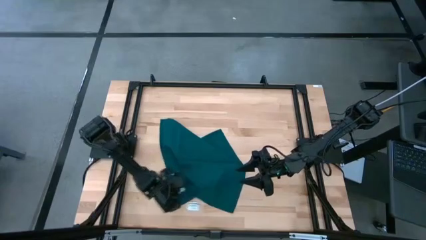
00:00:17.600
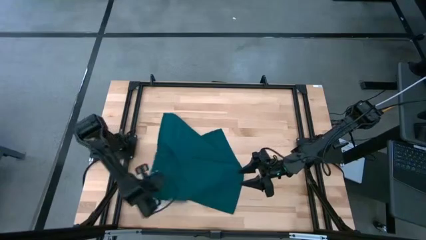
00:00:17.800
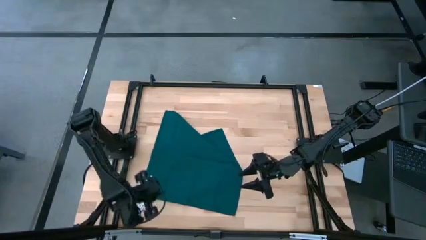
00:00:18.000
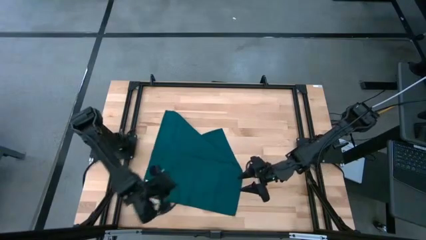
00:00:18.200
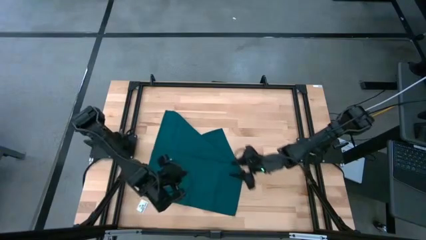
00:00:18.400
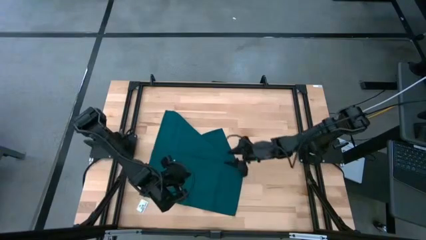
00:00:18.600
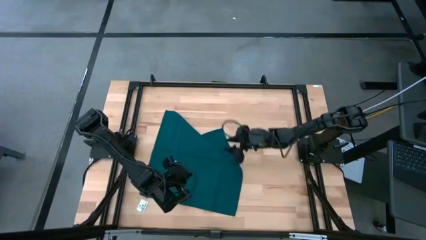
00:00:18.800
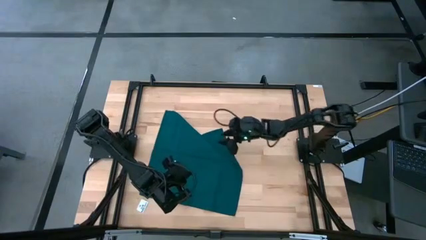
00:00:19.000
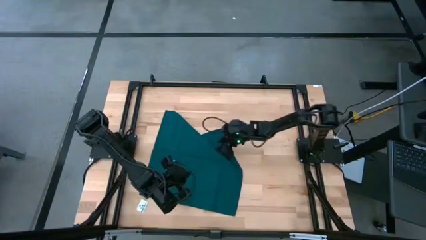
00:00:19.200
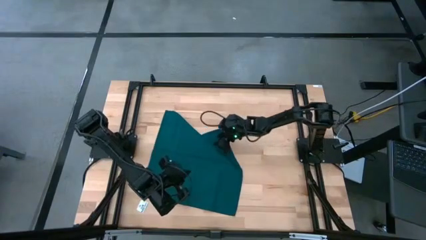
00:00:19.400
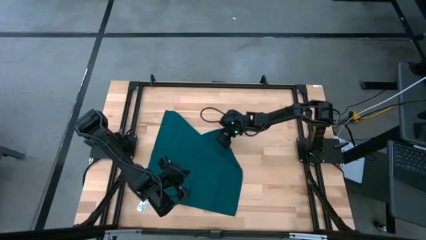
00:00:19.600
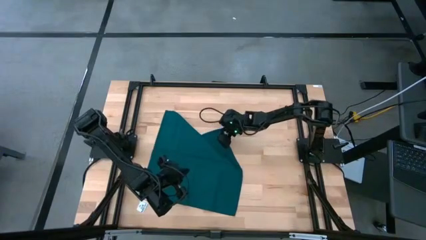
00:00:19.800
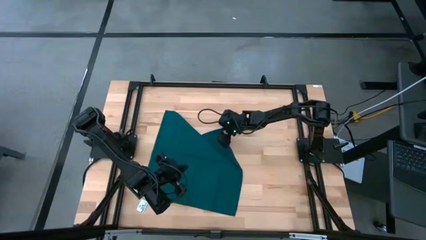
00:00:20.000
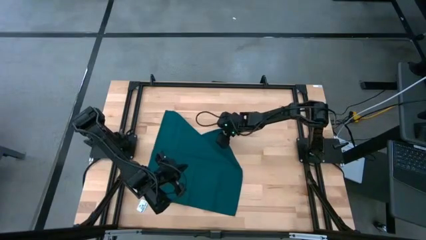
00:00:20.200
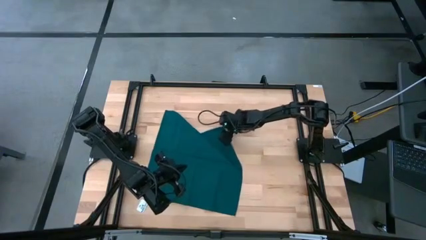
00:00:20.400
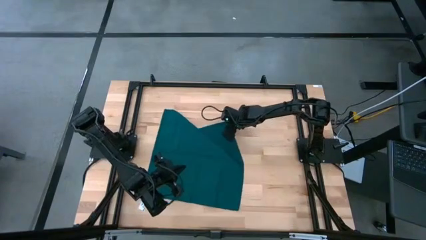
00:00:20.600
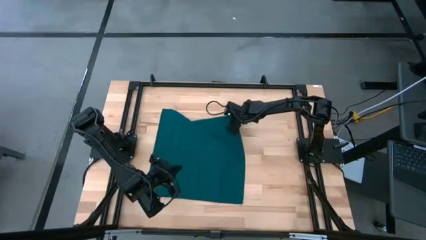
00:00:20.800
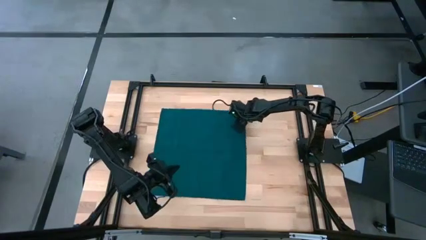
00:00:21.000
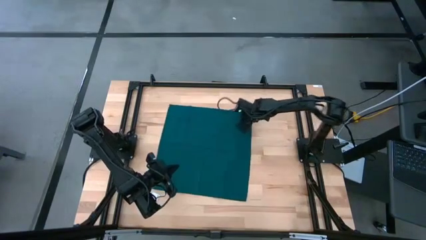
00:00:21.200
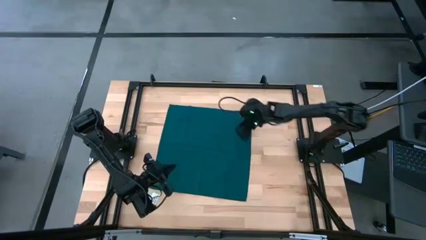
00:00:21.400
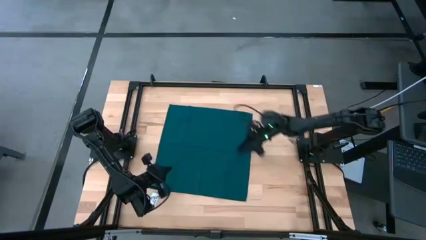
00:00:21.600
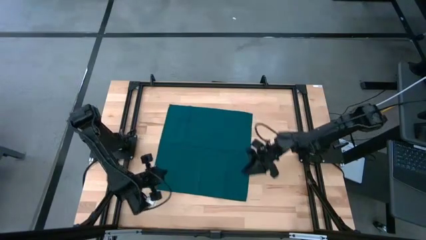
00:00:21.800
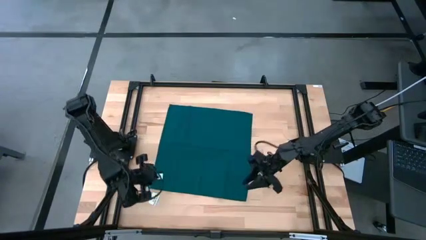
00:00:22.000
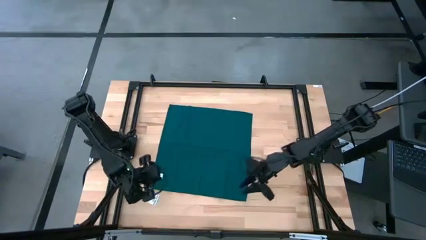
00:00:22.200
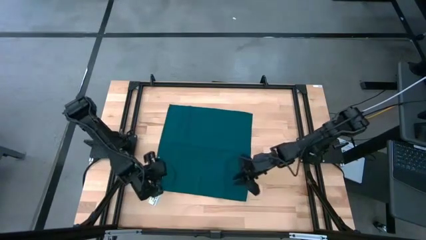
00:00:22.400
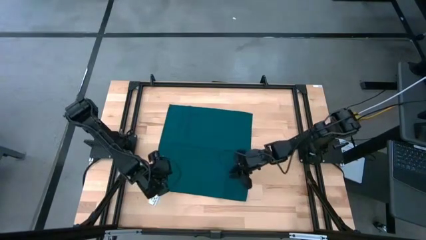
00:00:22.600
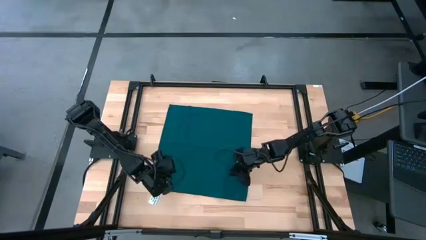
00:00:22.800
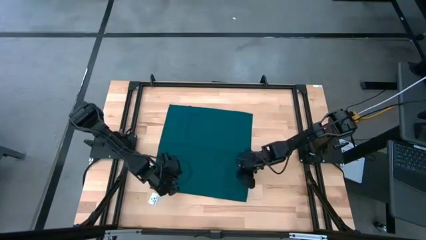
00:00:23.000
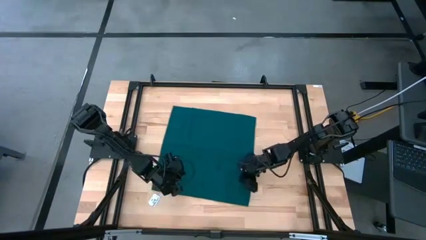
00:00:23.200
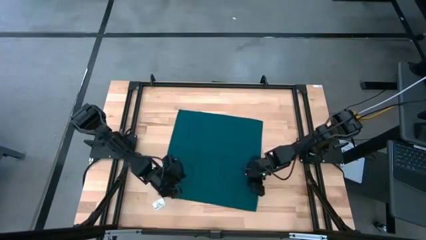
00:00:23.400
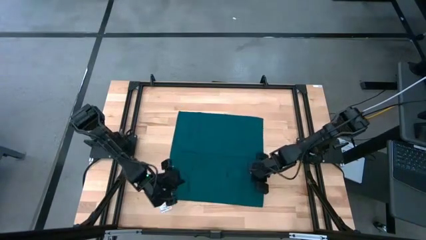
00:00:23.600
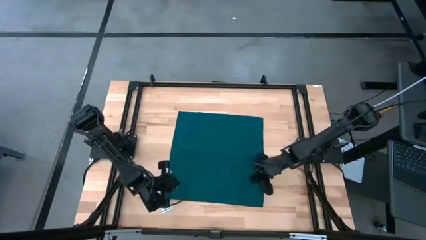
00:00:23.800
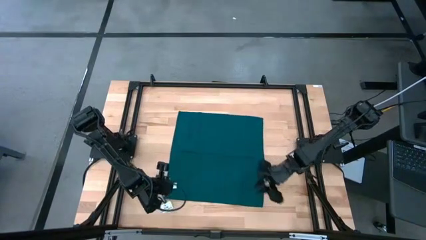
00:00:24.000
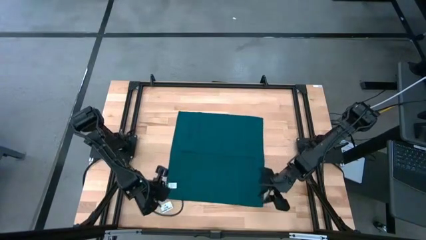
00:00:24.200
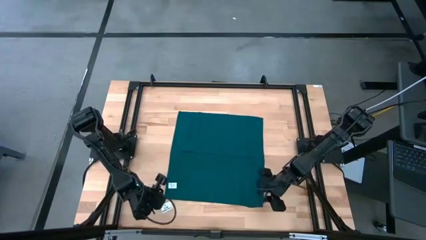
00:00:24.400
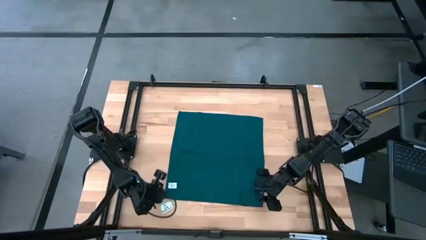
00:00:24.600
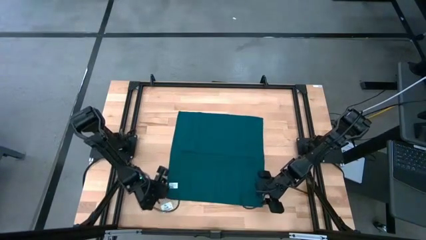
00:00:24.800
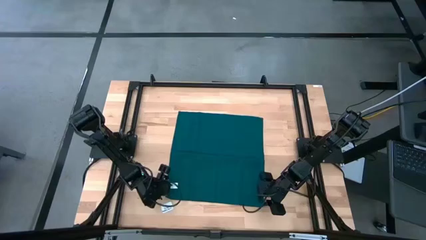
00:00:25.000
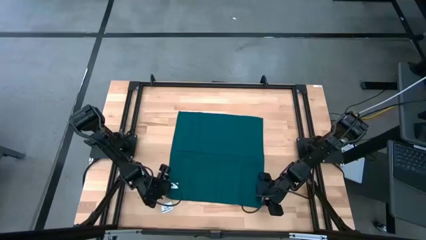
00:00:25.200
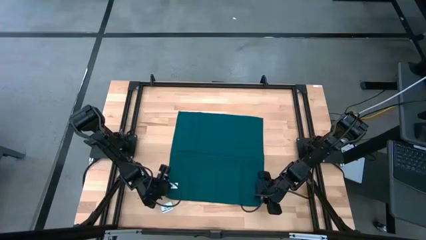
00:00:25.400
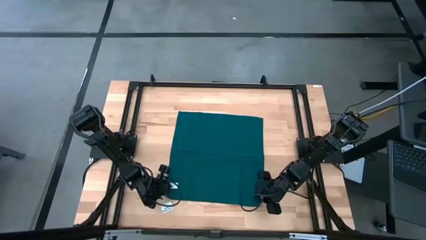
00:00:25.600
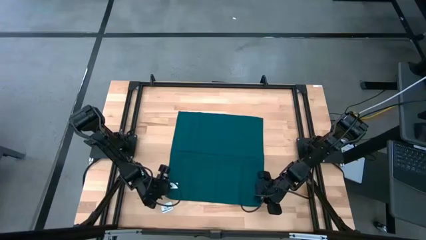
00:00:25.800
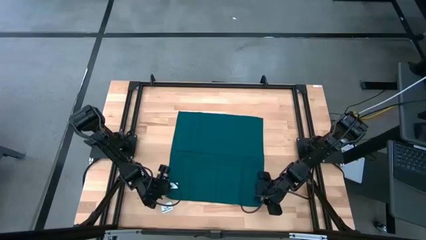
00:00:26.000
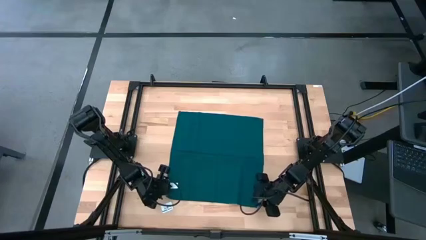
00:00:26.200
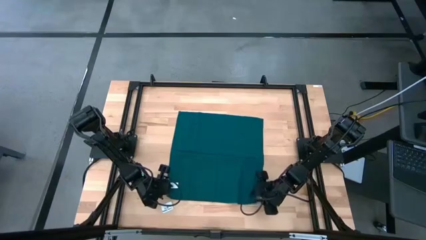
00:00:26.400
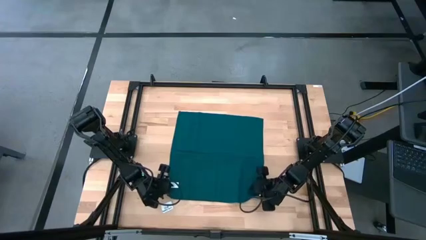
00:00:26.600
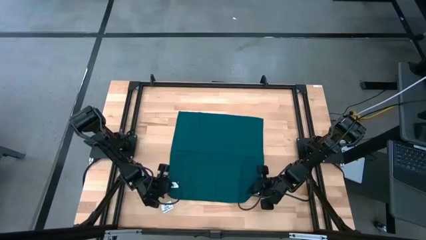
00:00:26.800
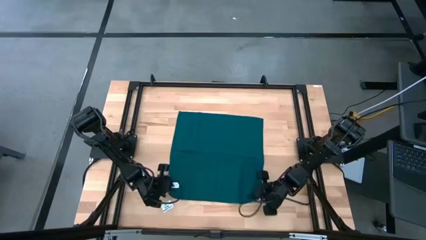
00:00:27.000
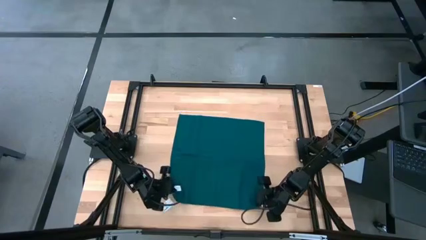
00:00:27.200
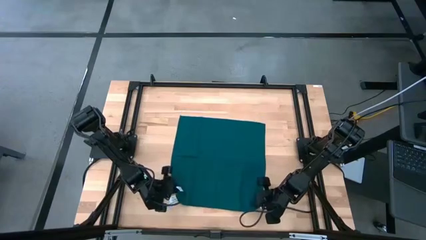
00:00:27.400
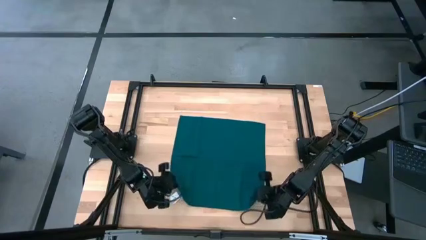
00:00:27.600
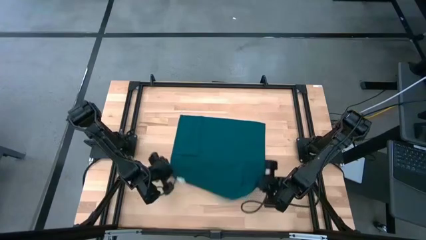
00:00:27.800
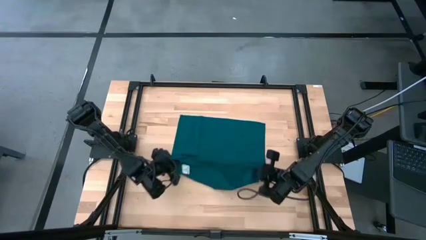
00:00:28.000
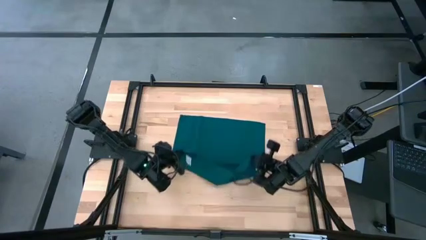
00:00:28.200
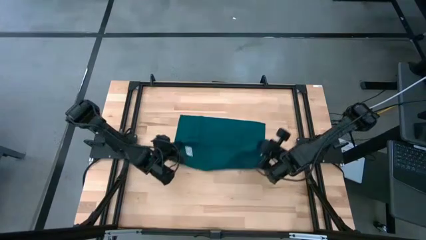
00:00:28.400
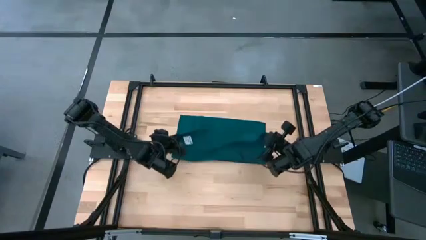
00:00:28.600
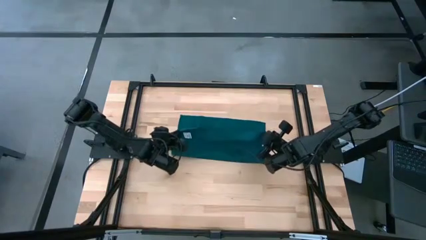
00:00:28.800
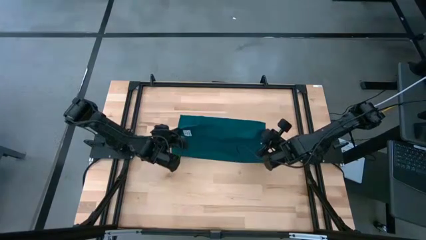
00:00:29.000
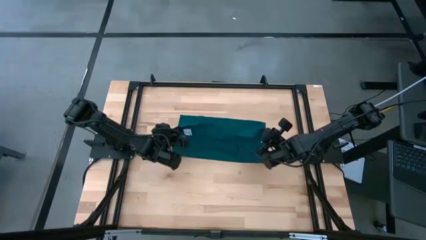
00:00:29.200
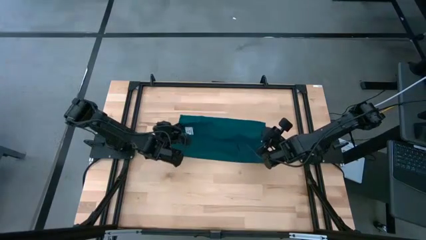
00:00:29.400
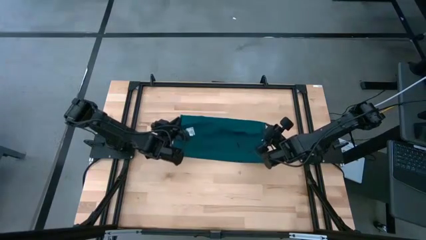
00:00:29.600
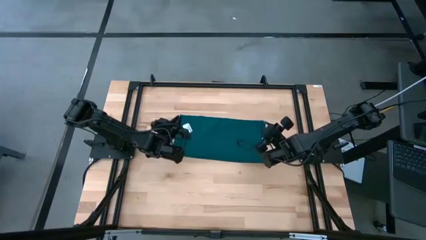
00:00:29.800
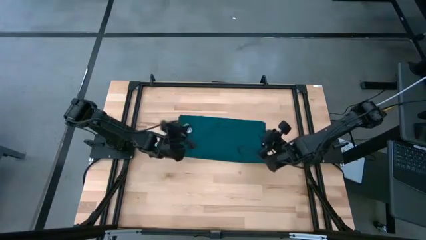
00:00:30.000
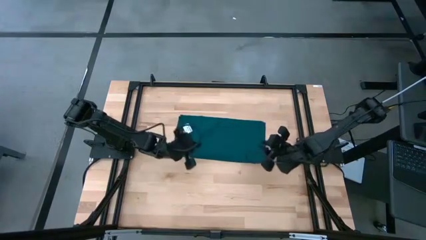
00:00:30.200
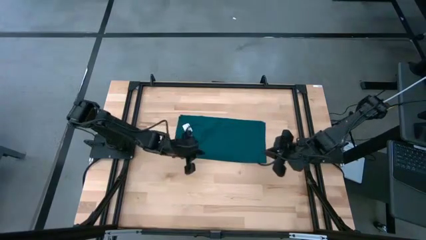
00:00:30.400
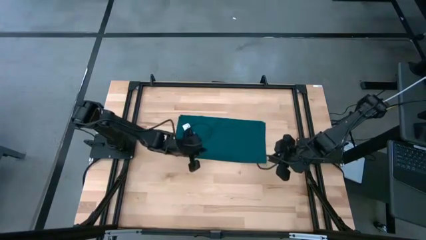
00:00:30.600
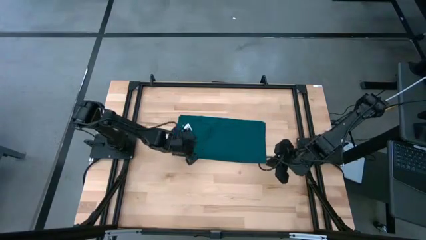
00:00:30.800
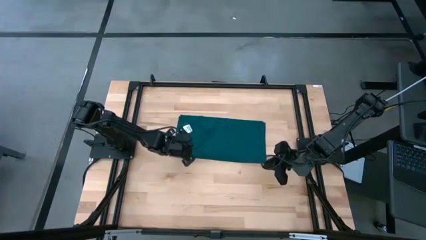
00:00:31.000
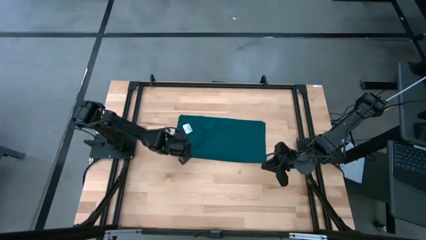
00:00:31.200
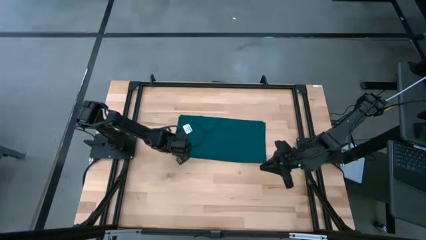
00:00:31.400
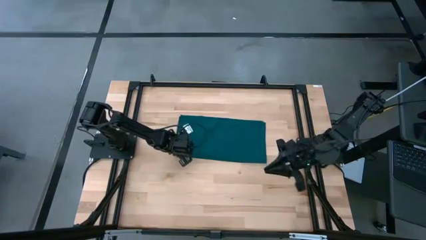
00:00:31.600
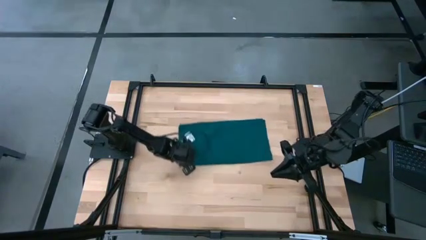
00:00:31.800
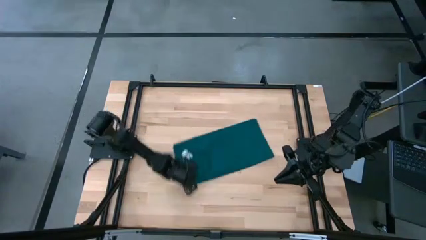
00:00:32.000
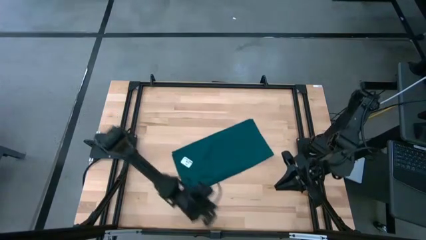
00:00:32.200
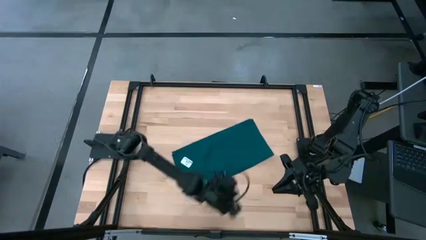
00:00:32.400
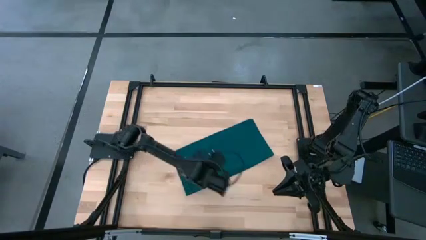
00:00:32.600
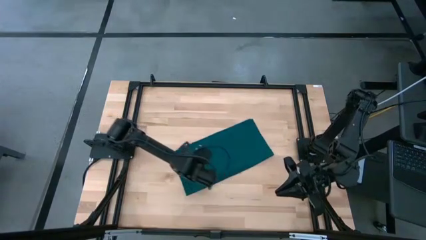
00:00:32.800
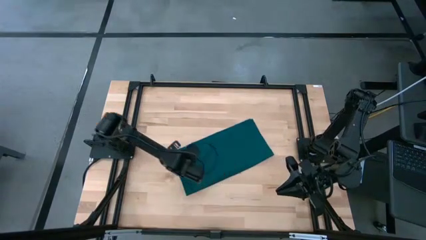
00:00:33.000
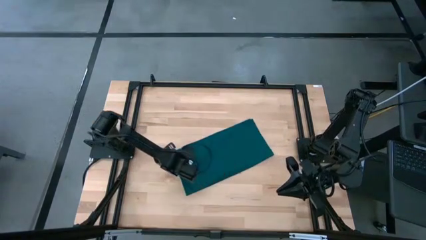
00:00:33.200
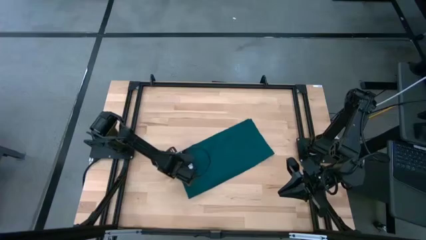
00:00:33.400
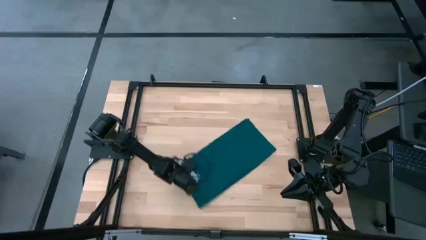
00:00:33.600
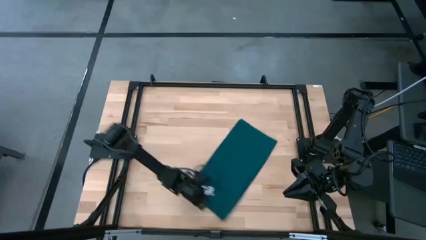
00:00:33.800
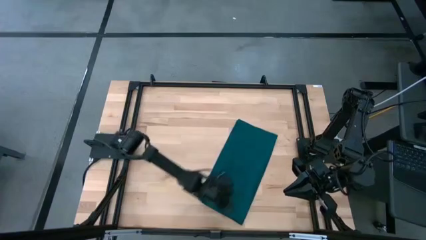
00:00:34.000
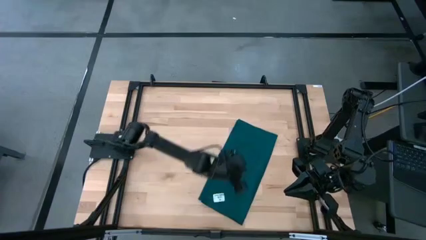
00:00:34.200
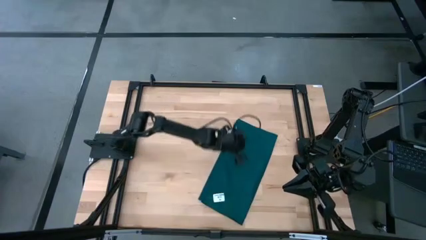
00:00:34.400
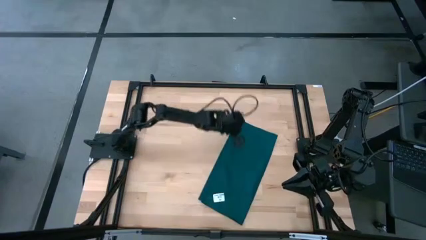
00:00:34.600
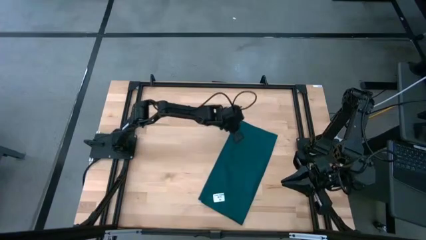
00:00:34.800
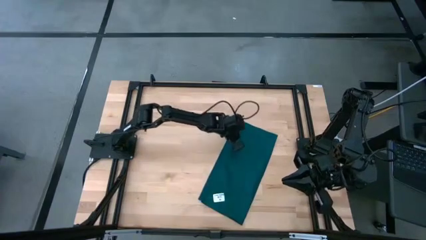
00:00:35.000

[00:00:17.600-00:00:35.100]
Task: Fold microfiber towels
Fold the towel
